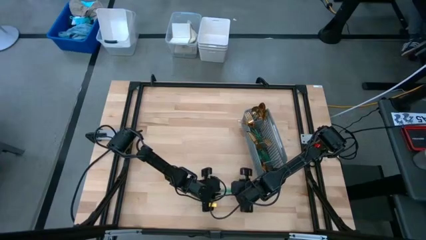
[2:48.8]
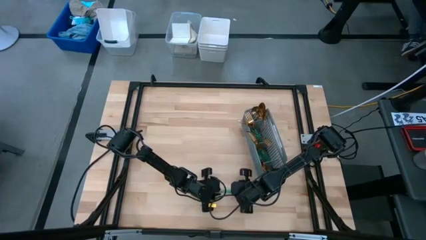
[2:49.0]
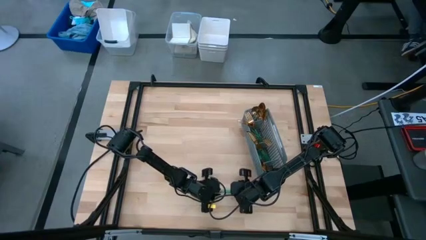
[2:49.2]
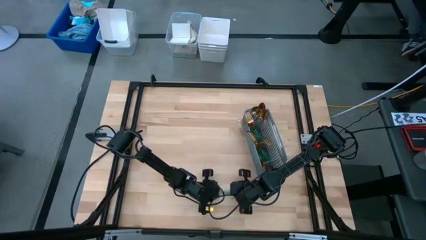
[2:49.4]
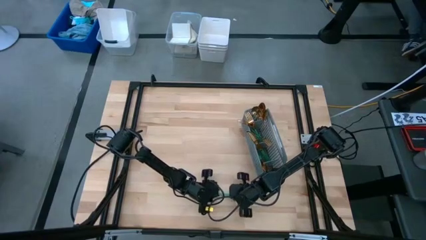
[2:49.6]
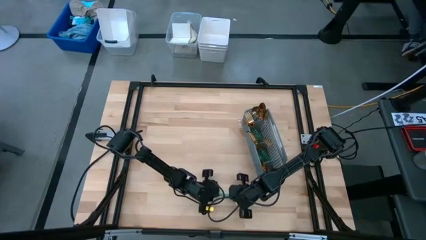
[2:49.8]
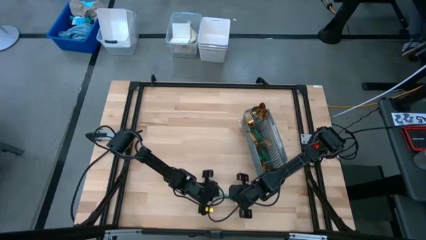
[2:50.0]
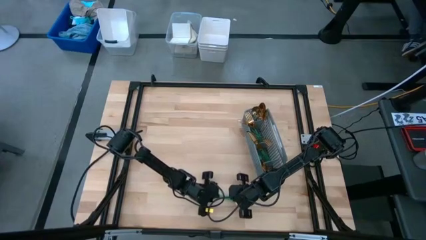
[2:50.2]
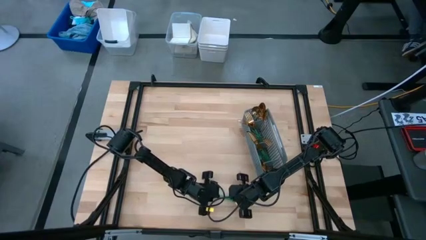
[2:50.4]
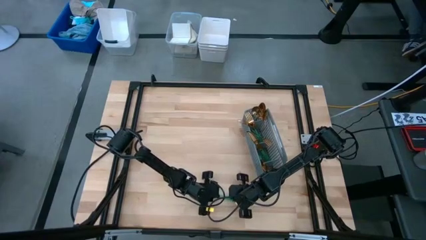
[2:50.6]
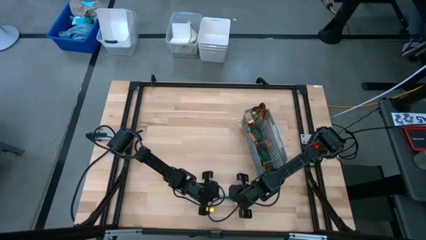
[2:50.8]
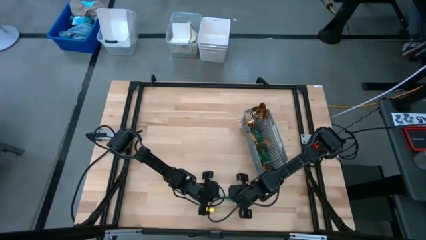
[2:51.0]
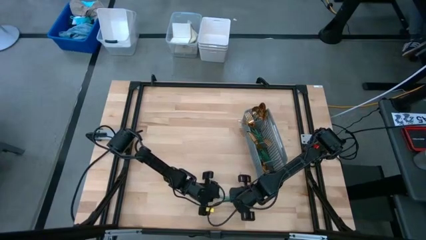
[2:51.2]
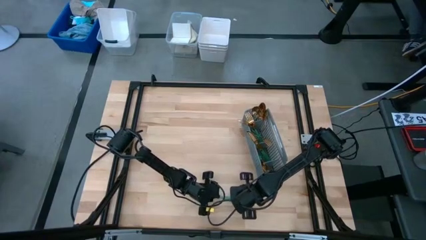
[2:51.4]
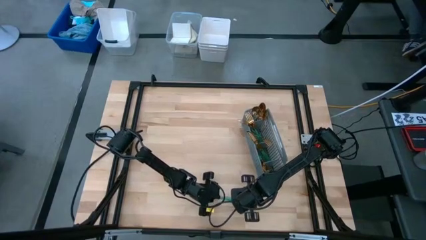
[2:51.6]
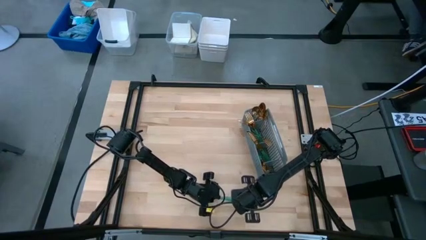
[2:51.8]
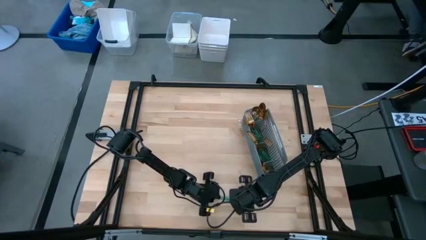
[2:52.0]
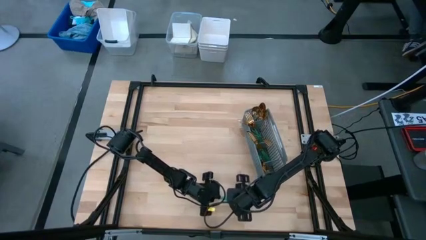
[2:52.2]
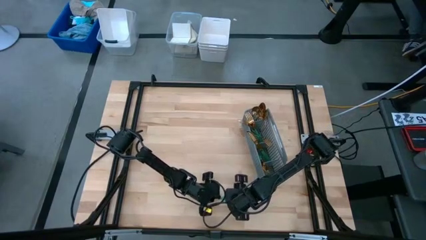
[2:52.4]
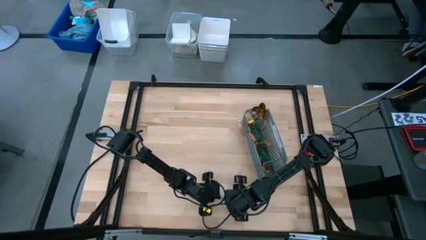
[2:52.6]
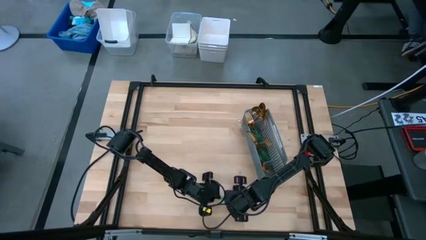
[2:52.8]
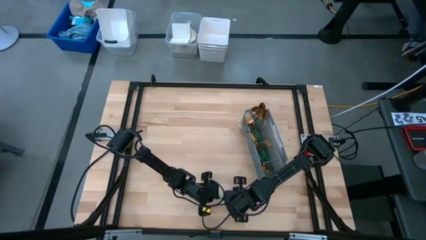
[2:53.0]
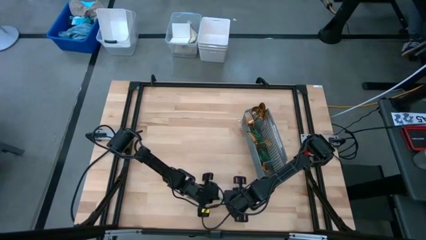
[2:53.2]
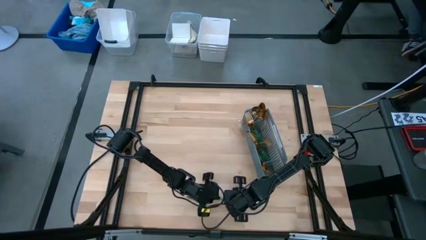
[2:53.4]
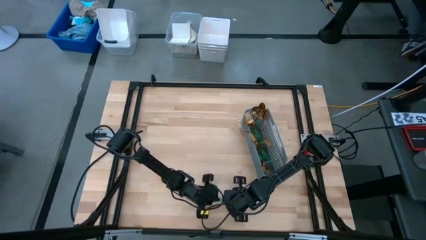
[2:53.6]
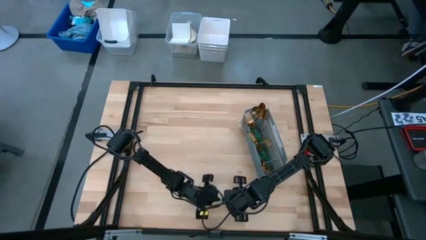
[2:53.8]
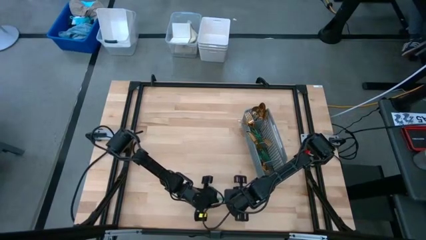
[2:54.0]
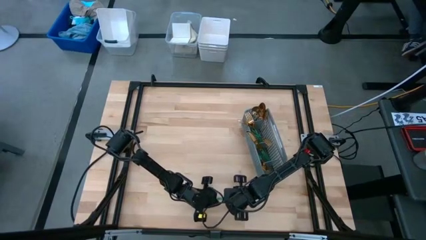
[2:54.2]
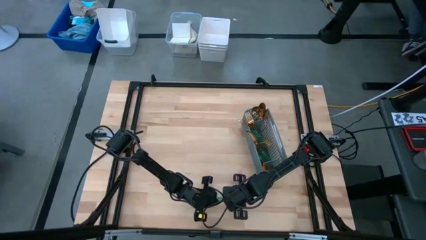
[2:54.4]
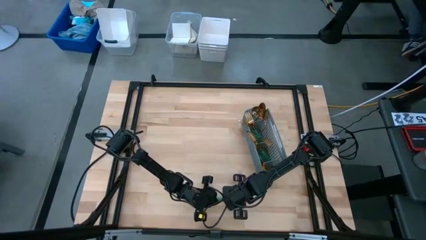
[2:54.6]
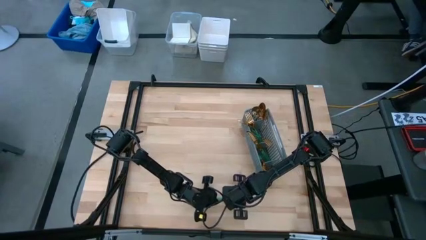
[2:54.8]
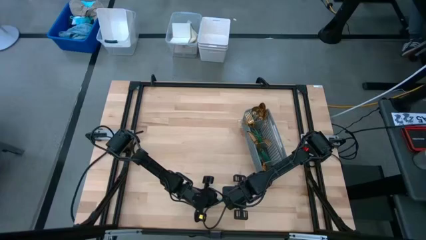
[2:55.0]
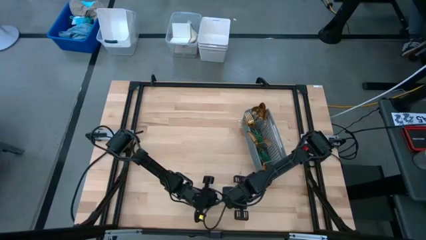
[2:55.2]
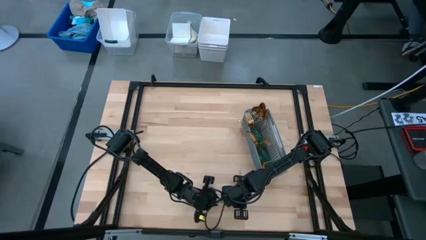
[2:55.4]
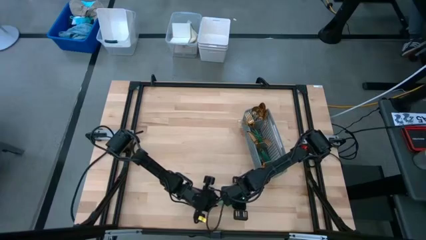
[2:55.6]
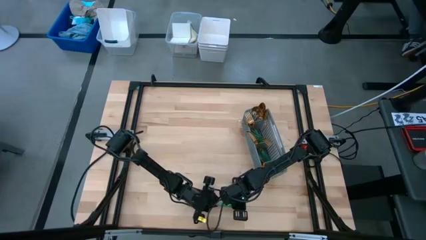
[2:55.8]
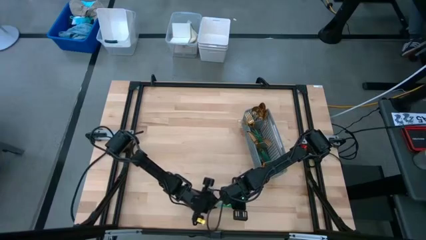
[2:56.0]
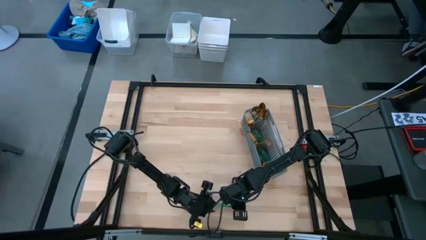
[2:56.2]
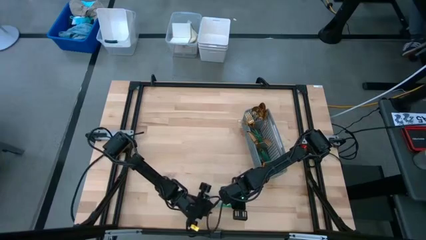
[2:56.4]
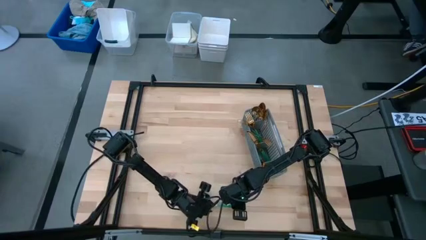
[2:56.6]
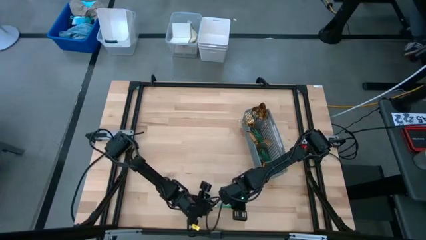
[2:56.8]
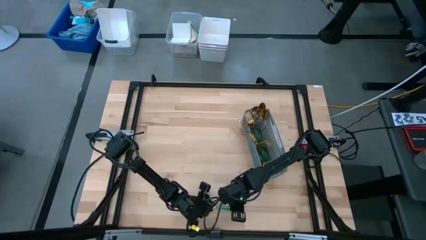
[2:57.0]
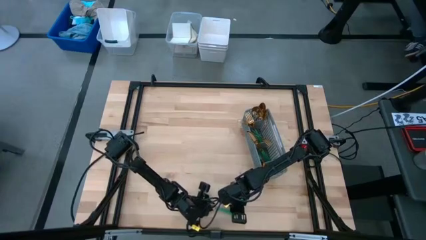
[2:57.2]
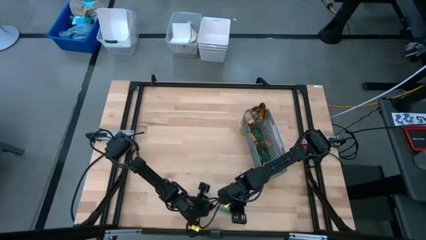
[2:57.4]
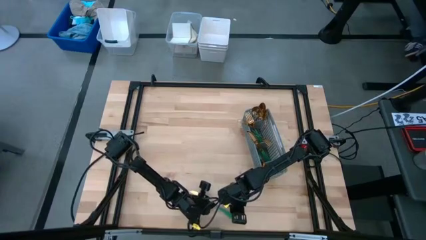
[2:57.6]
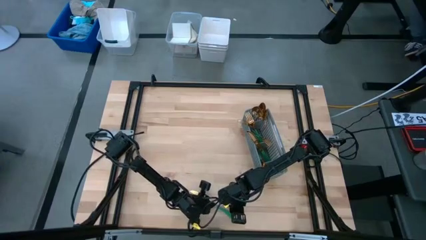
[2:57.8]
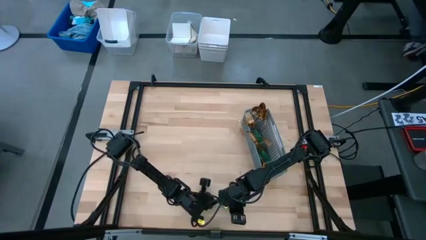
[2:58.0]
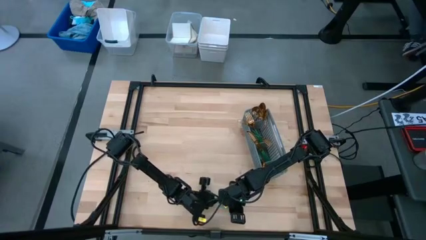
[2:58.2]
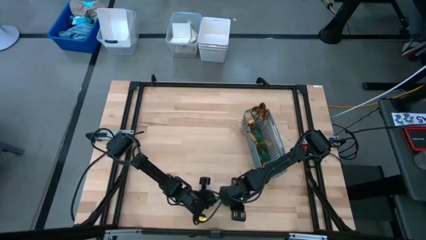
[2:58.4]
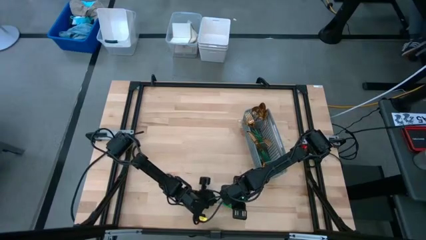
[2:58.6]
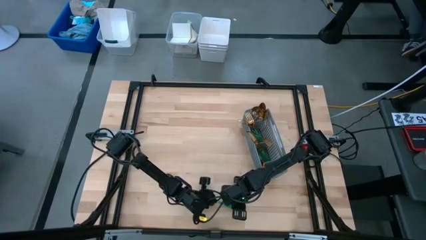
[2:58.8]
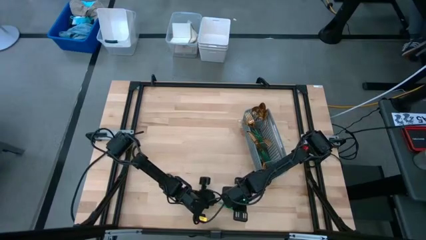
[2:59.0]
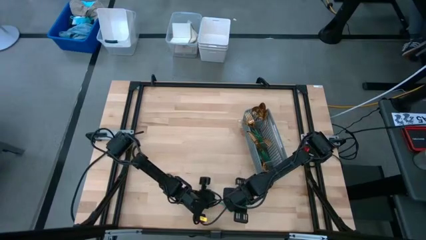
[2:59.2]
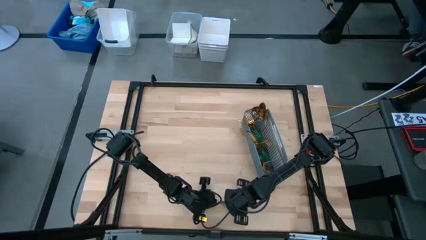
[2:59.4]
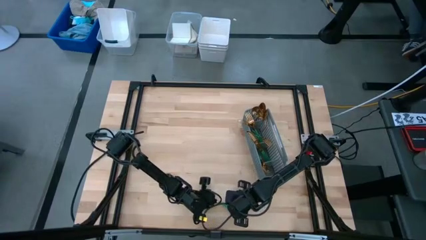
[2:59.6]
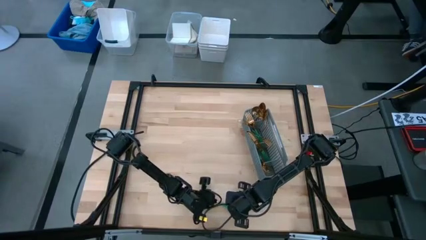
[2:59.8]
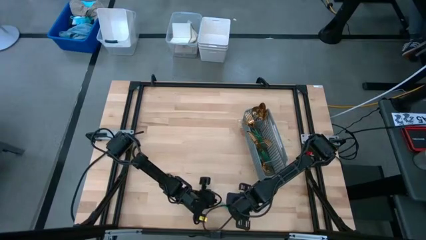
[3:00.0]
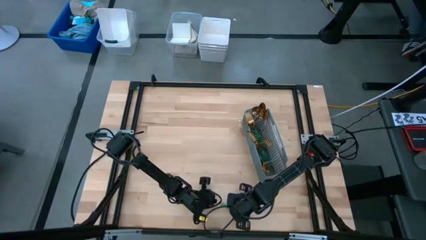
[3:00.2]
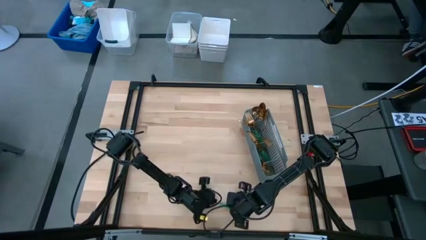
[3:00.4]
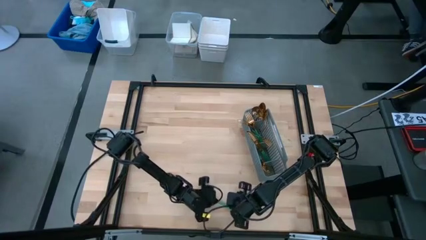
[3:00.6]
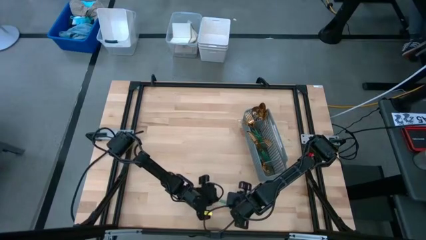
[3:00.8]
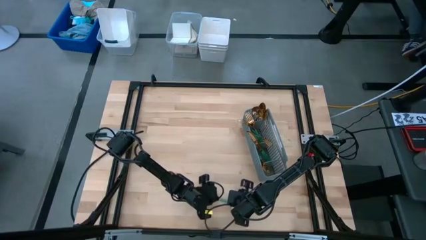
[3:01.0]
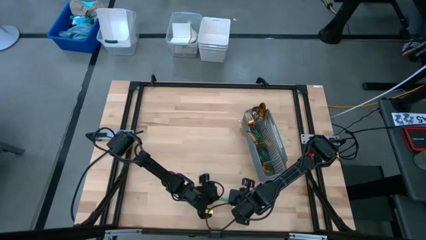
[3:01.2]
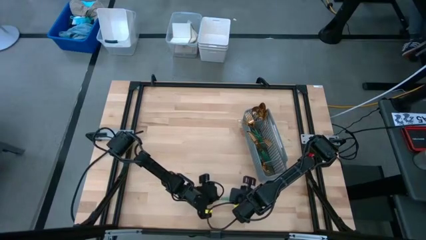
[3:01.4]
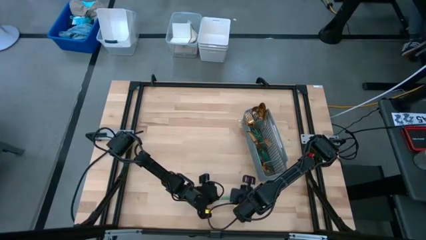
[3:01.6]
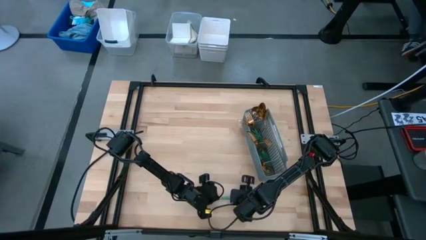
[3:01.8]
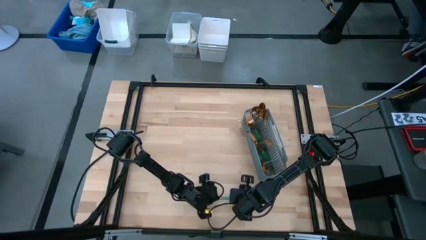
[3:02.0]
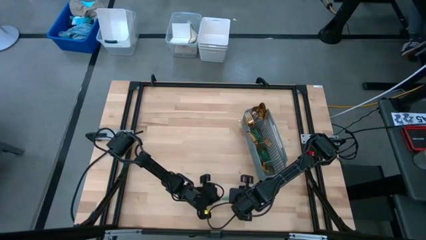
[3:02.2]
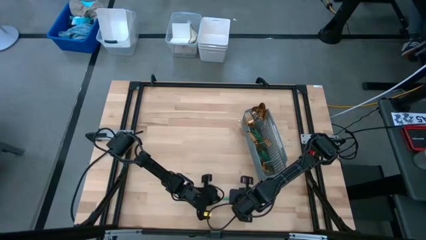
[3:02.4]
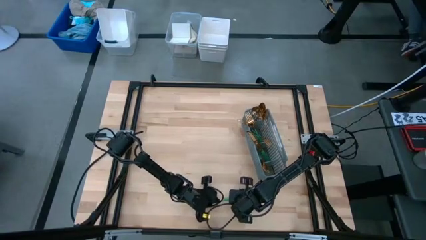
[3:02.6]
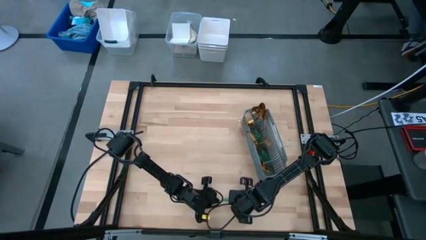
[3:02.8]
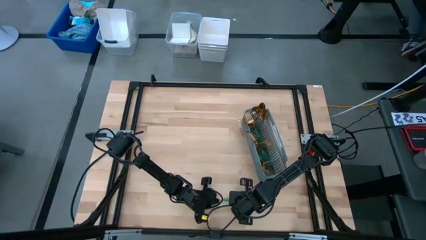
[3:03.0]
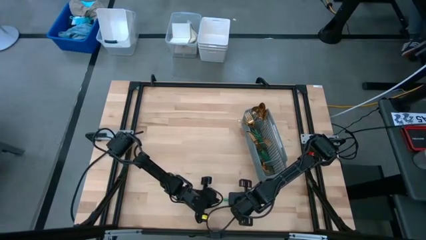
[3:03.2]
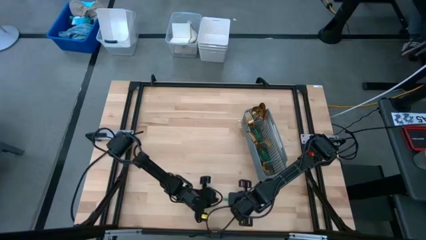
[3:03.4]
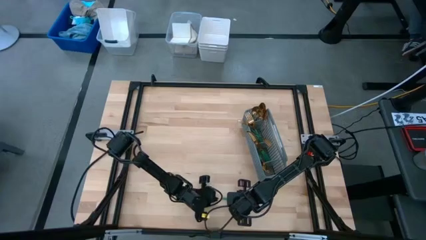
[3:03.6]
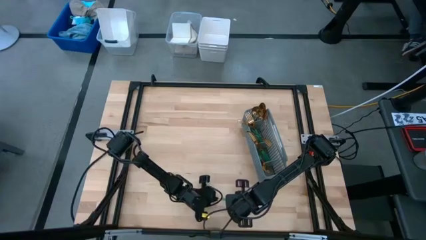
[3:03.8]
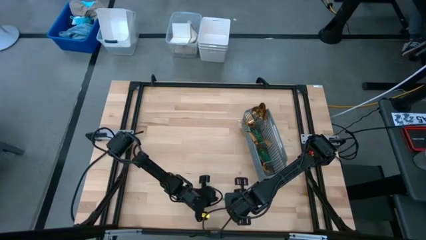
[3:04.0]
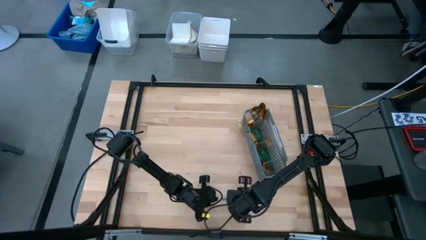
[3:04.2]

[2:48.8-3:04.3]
Task: Sort silverware
Put the knife into the bottom section of the basket
